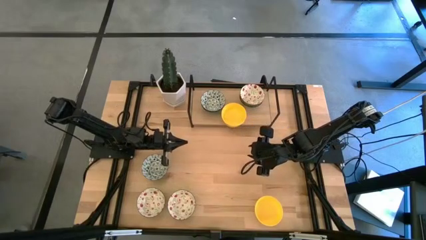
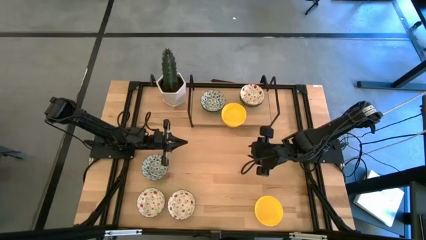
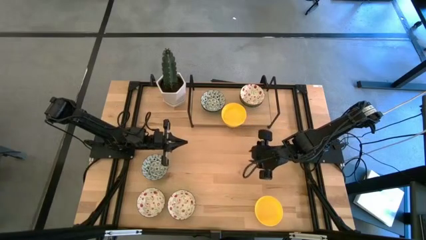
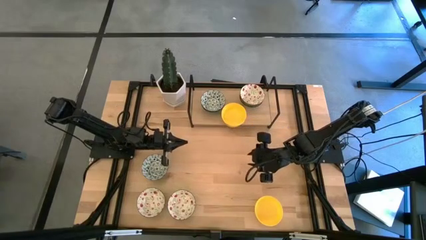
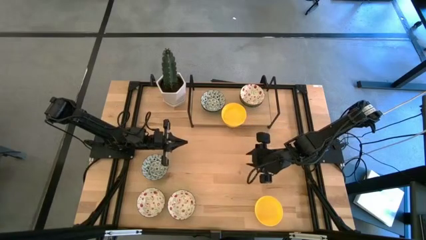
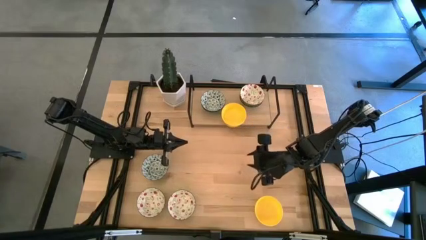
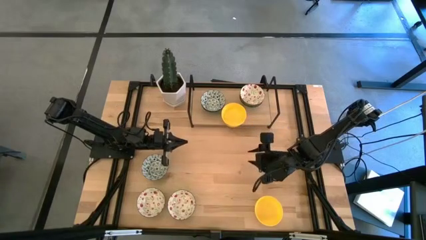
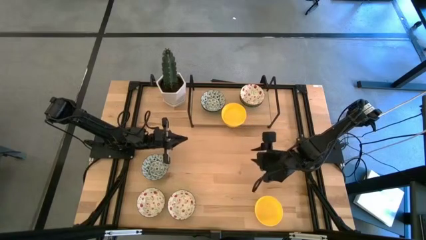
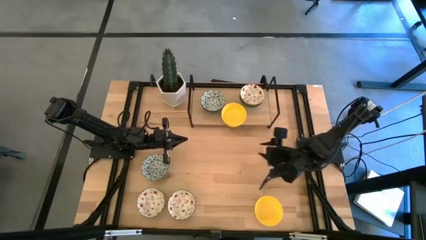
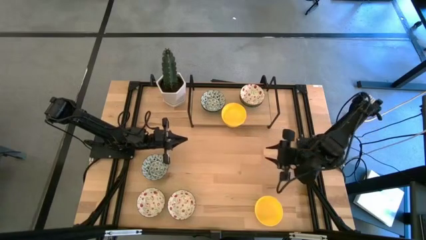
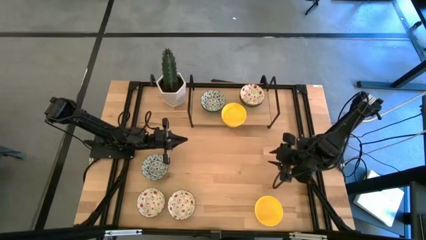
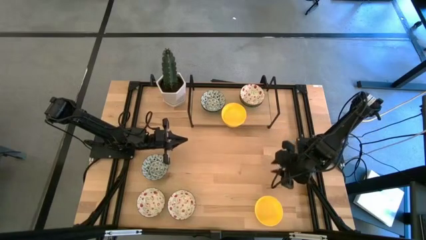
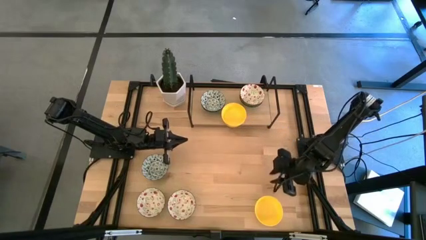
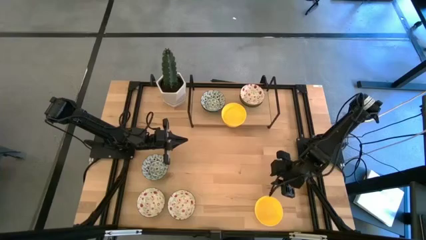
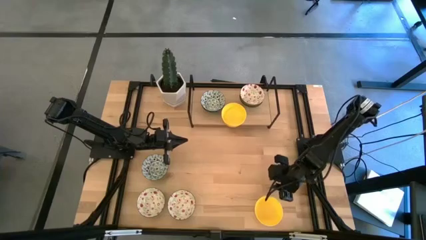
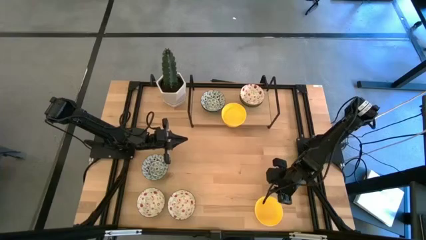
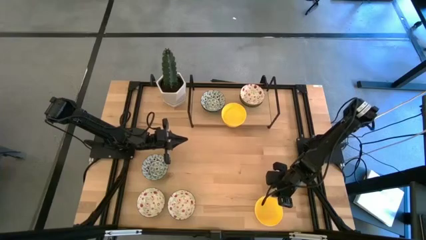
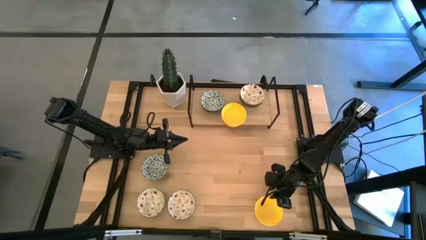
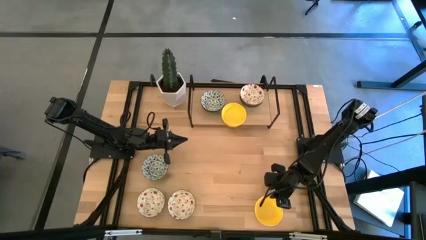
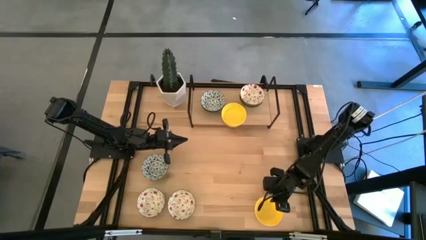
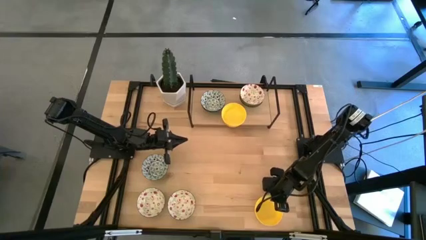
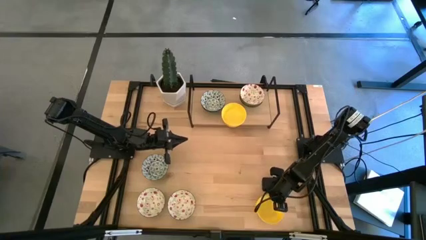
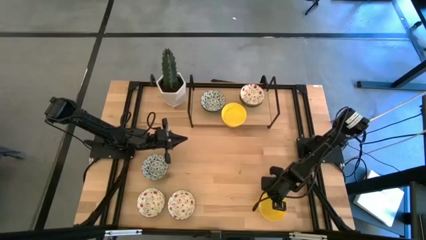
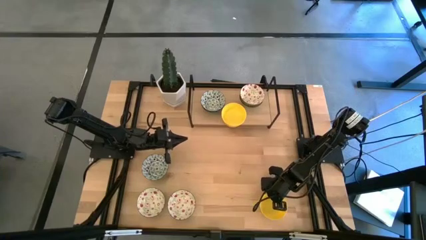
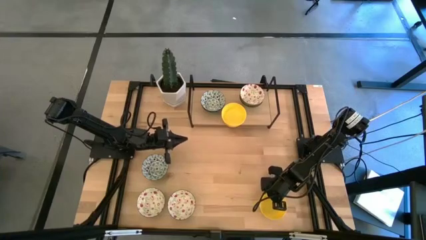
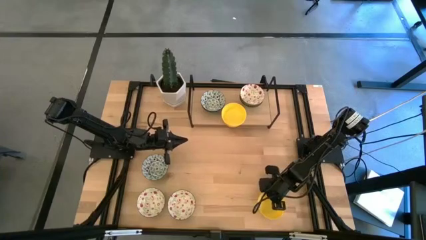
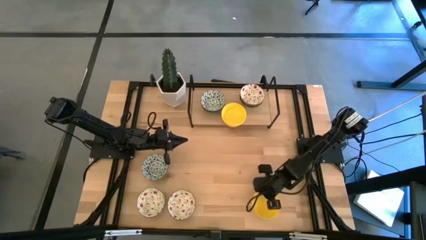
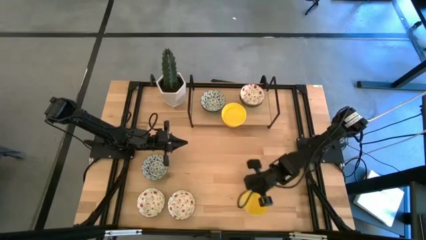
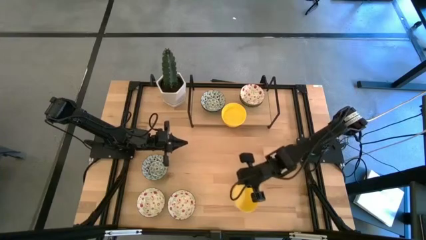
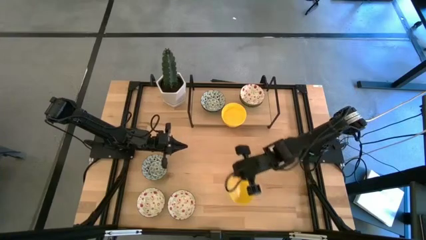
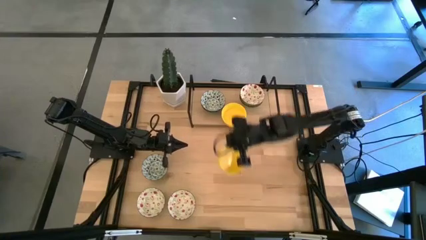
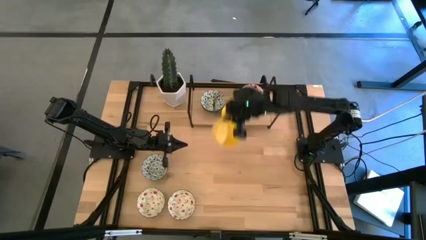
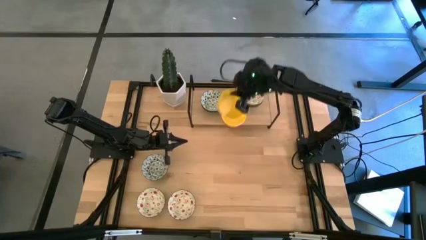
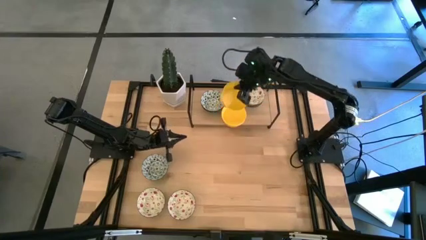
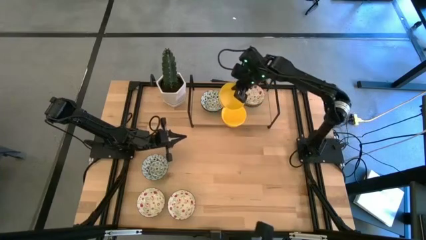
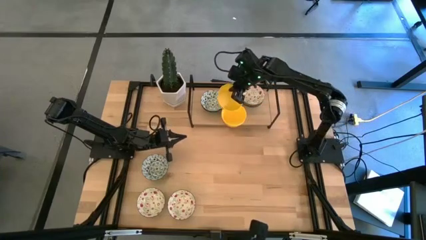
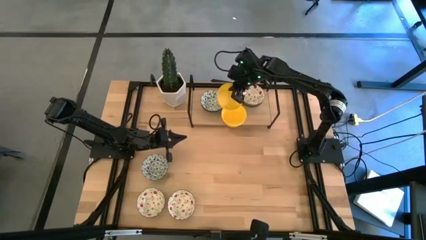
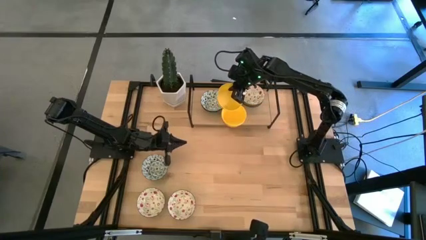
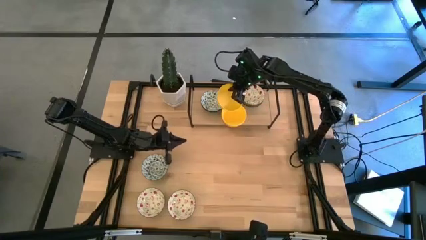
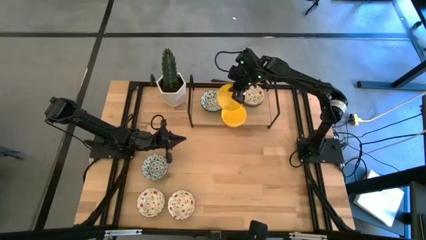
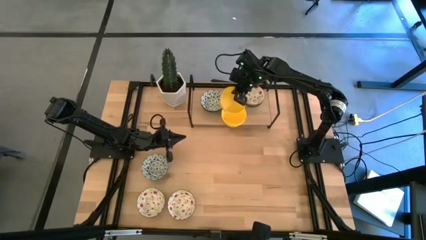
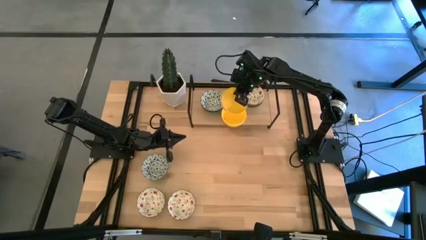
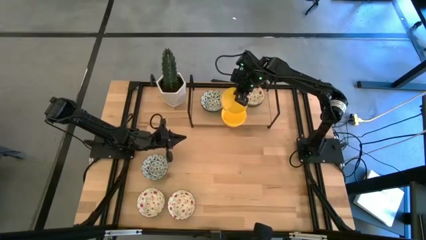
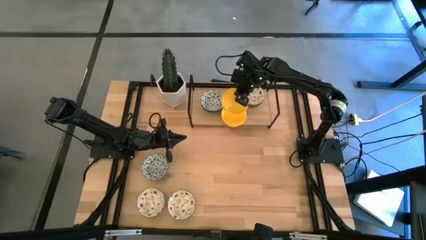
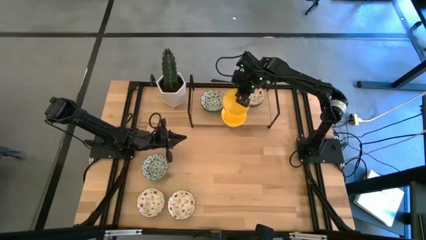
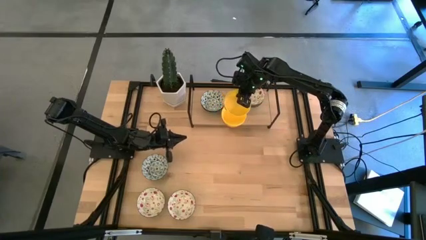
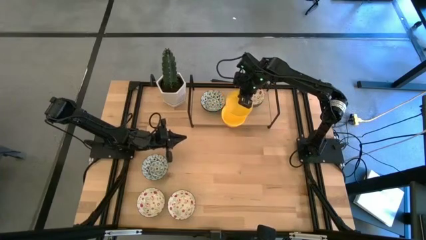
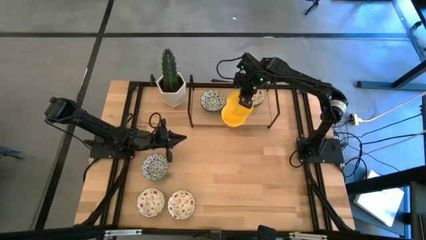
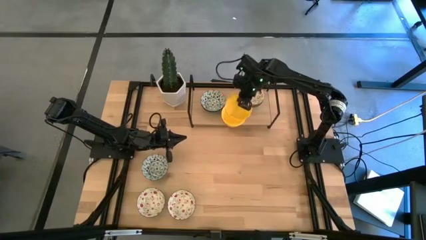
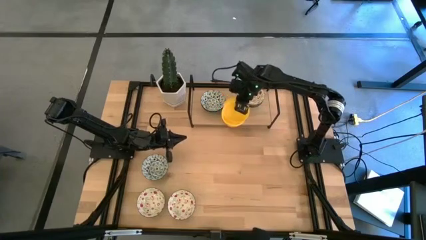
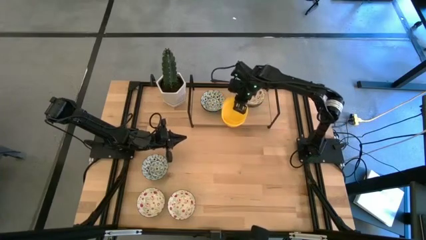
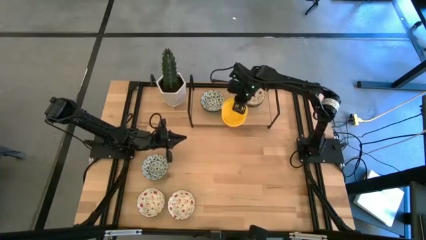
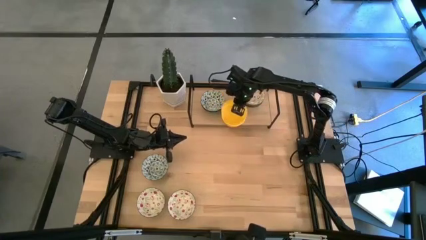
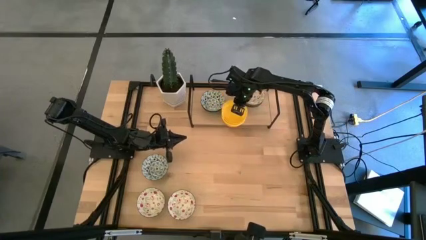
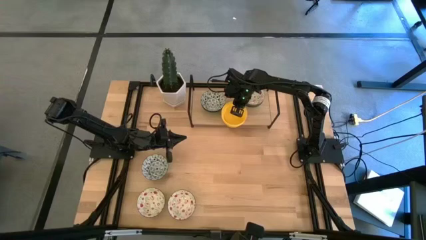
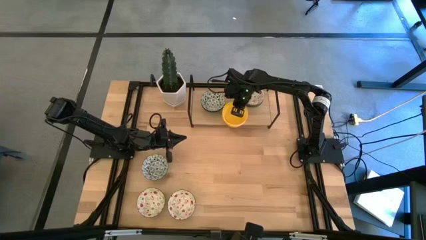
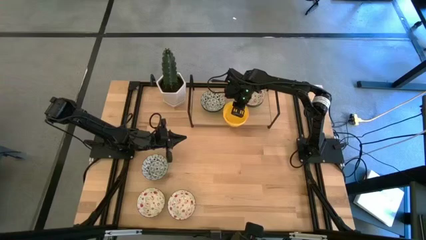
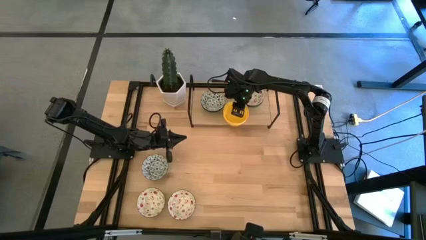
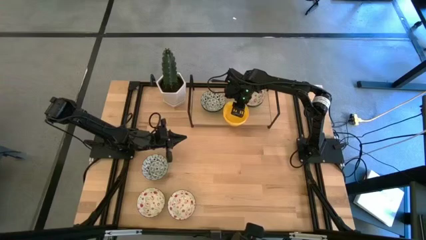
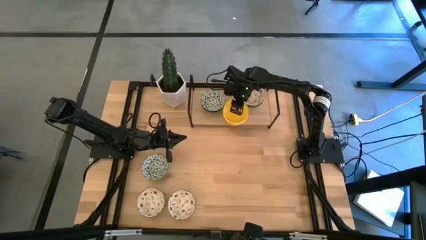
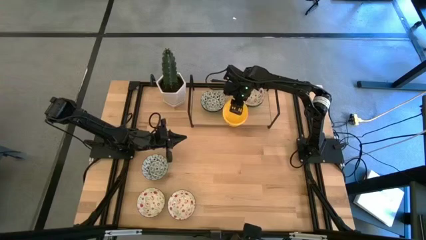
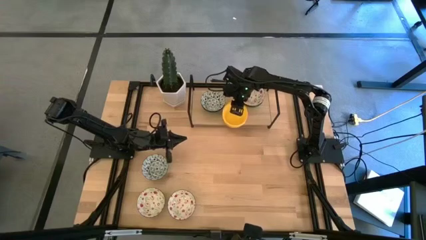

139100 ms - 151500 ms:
Task: Pick & Place Mini bowls
Stack the yellow bowl on top of the yellow bowl on the shelf

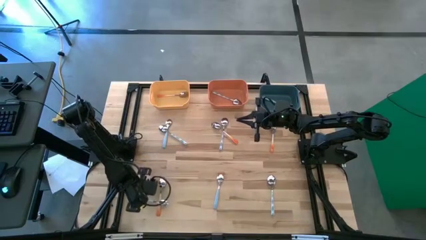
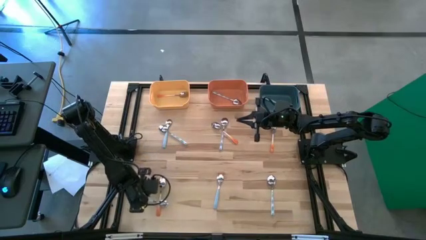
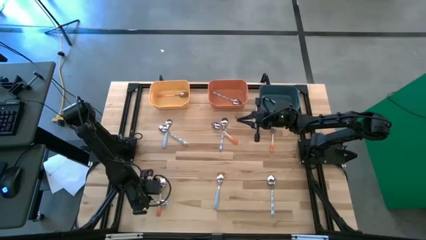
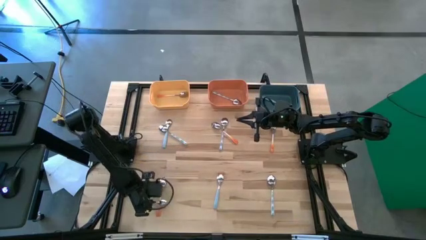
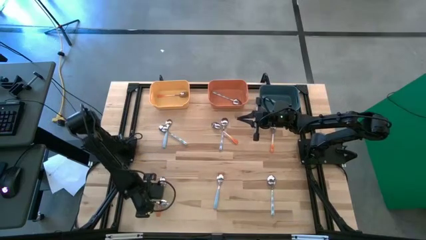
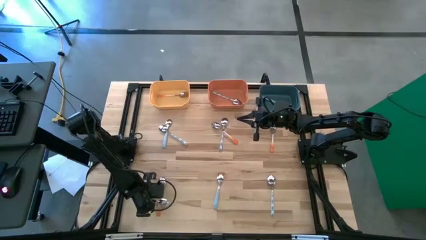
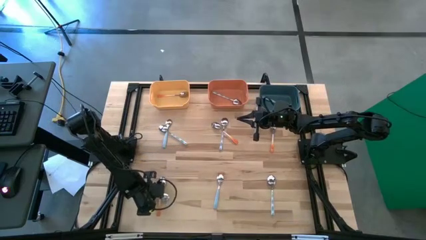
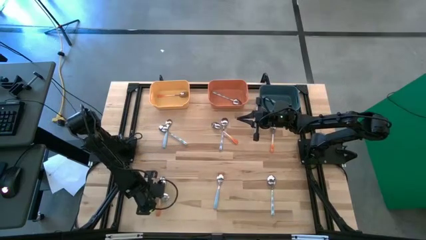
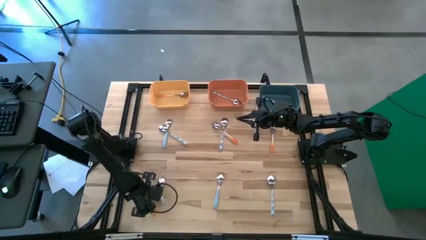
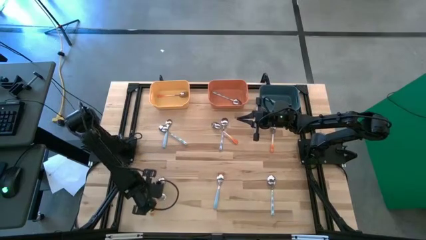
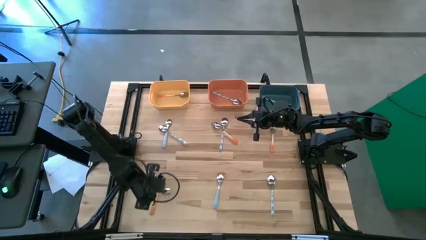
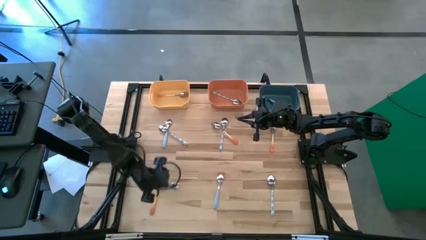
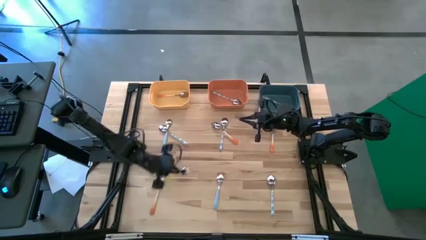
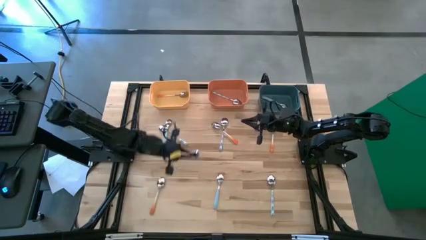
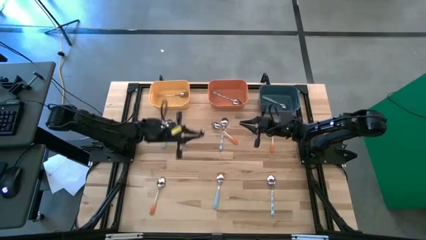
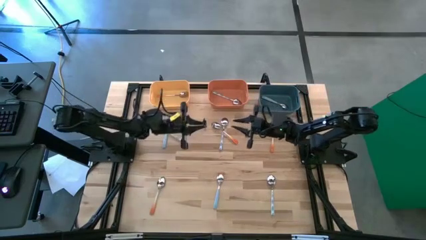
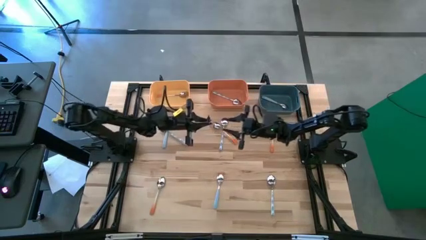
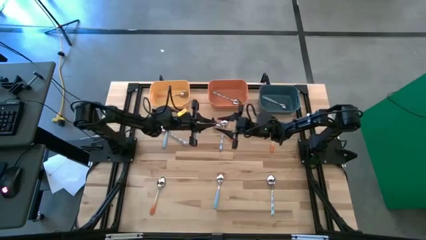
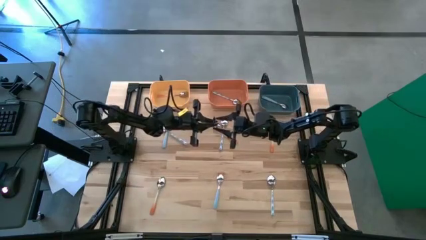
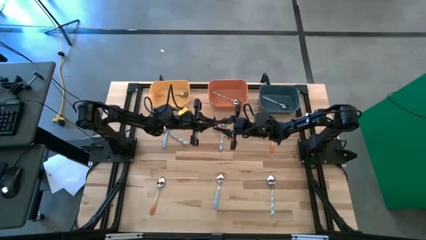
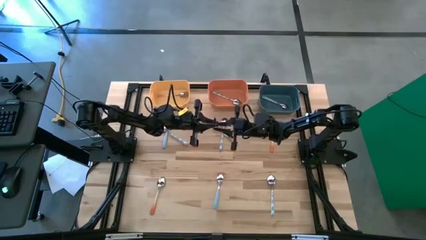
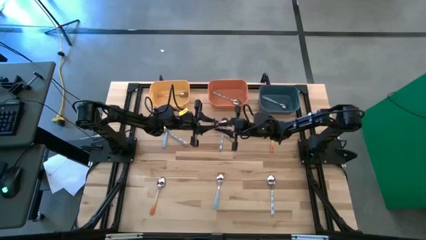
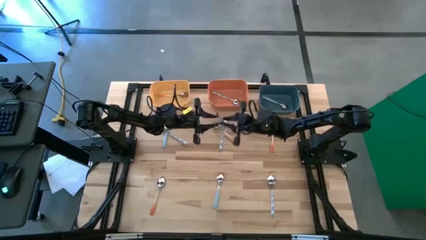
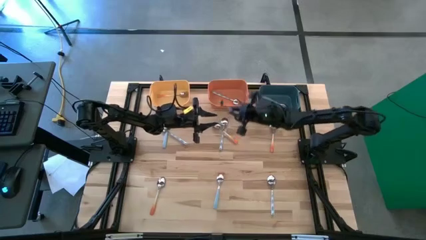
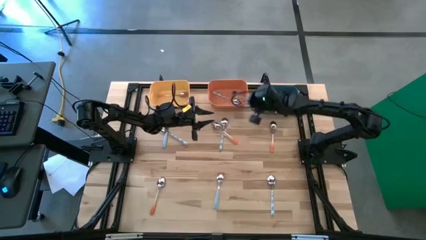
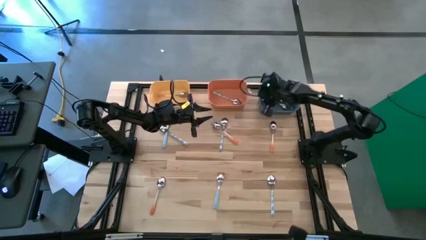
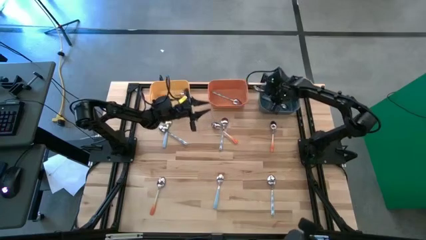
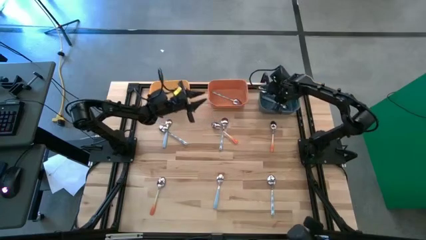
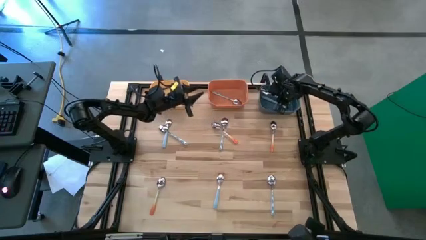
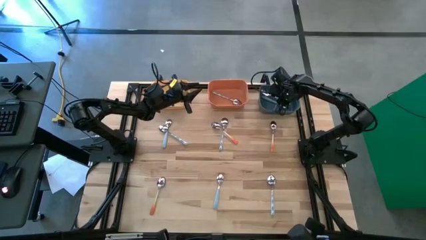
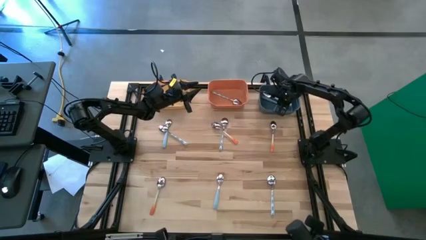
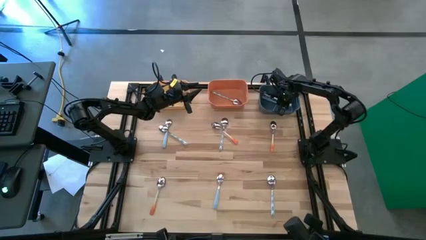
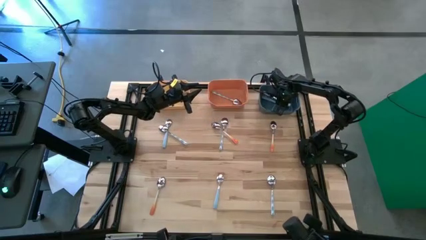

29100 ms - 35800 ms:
Task: Sort silverware by color (type)
Put the blue spoon into the blue bin
